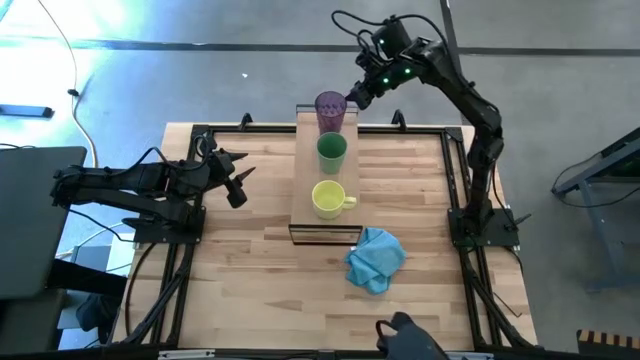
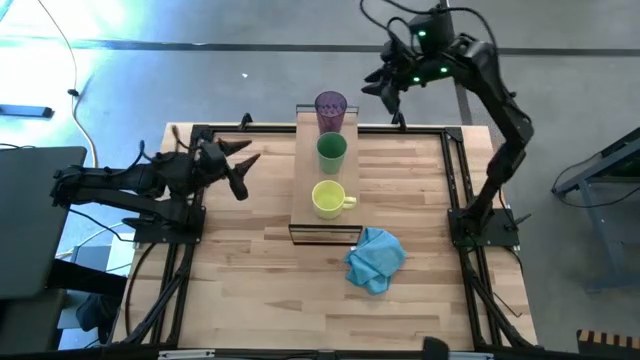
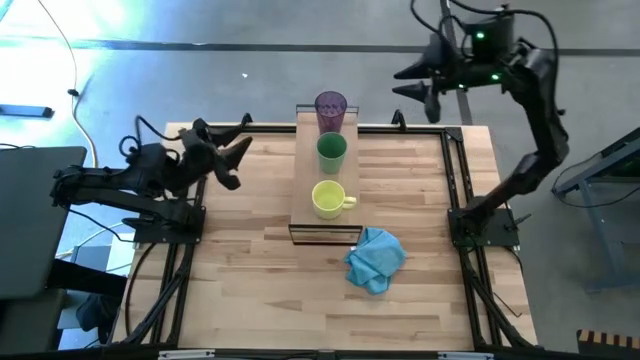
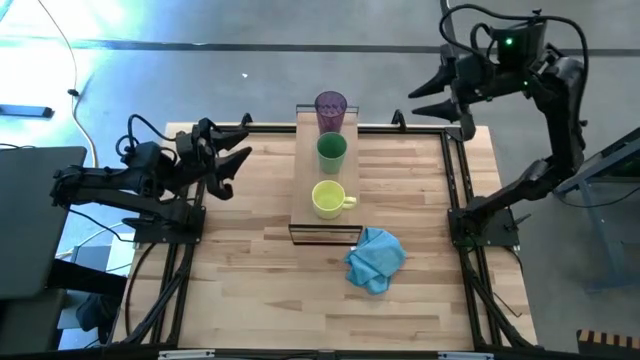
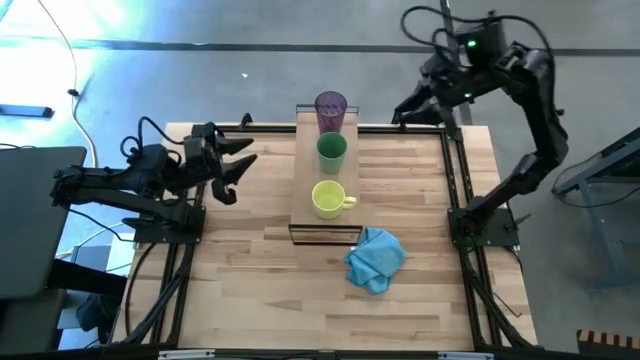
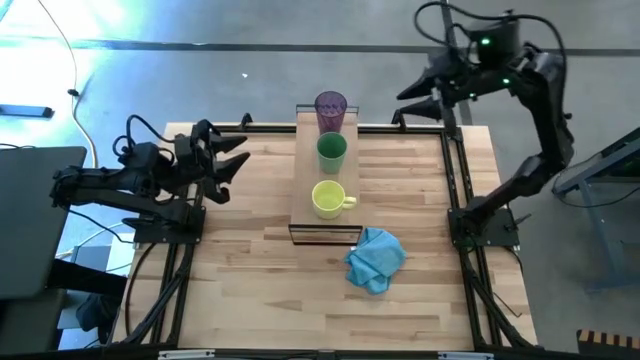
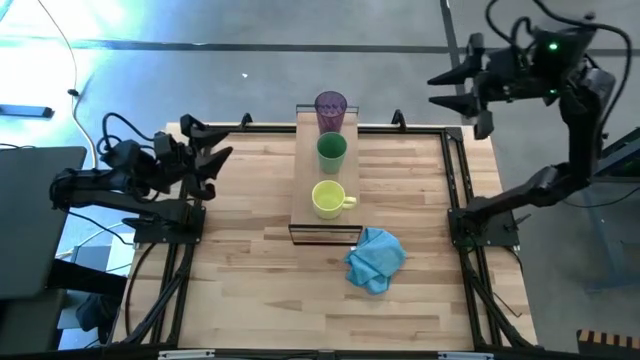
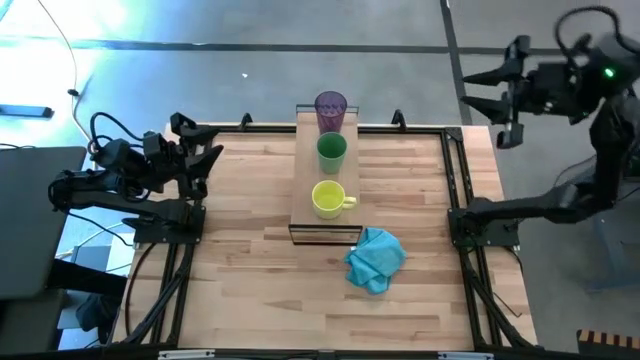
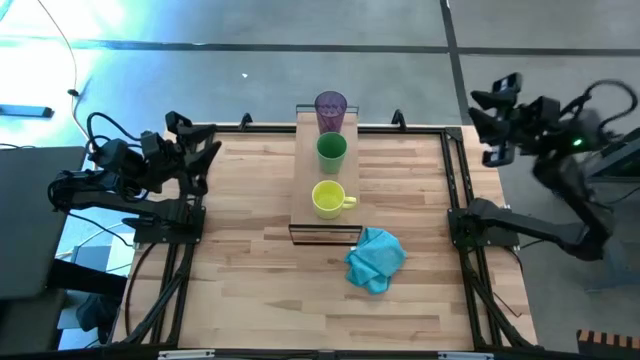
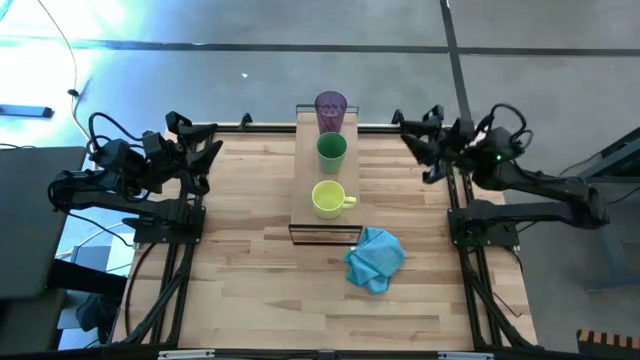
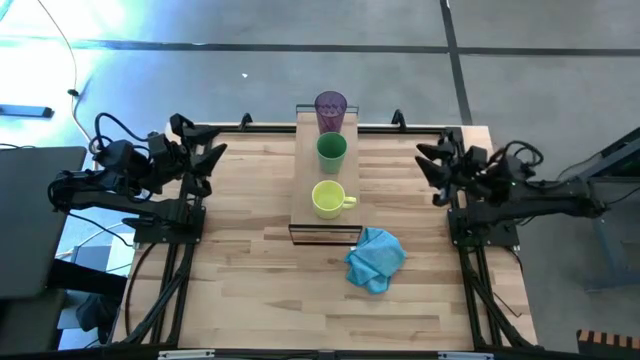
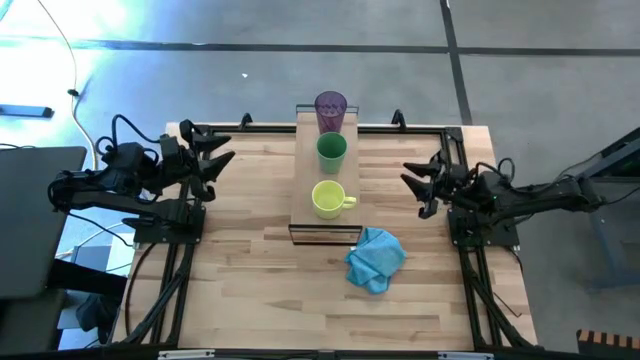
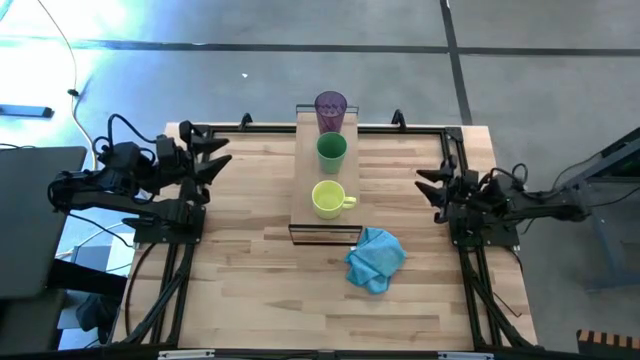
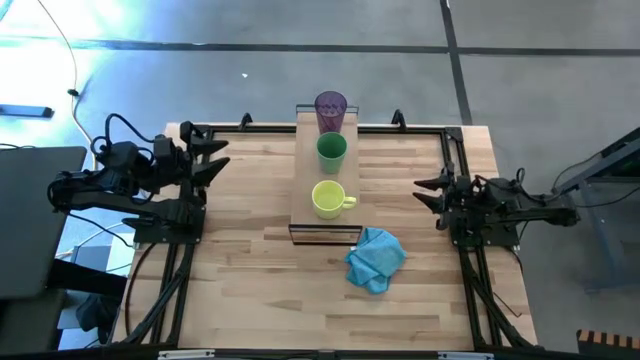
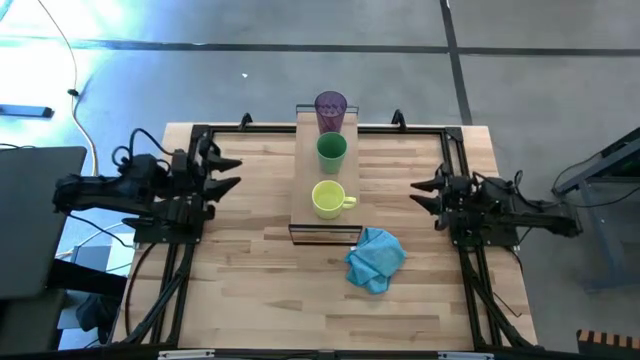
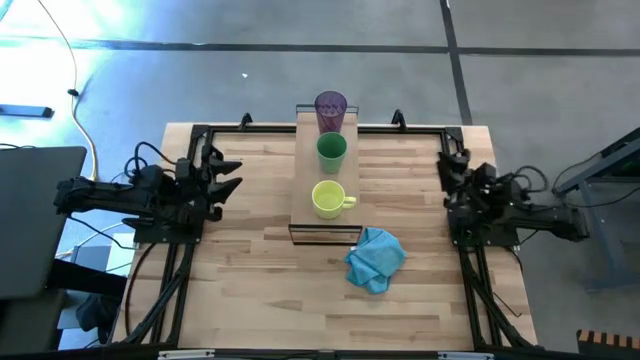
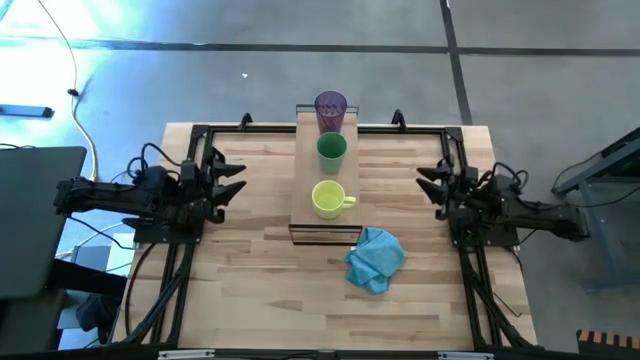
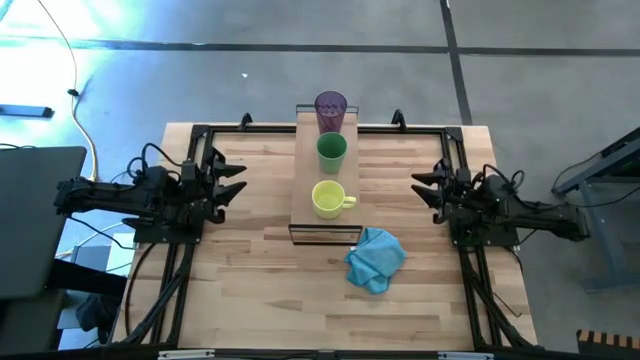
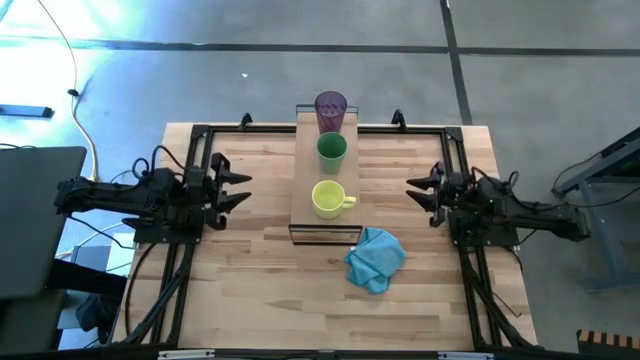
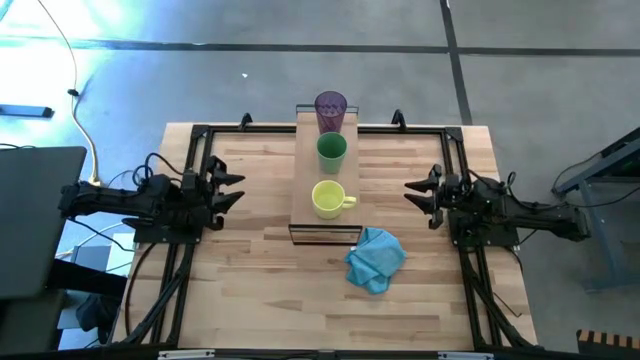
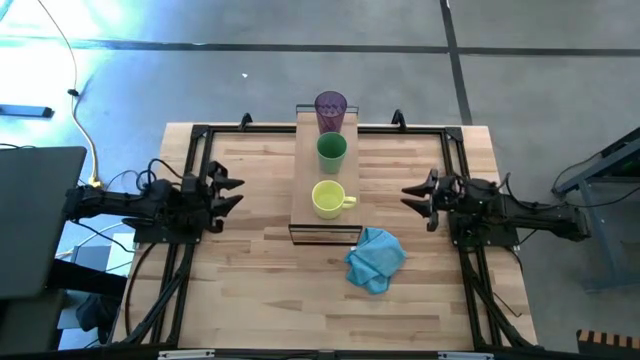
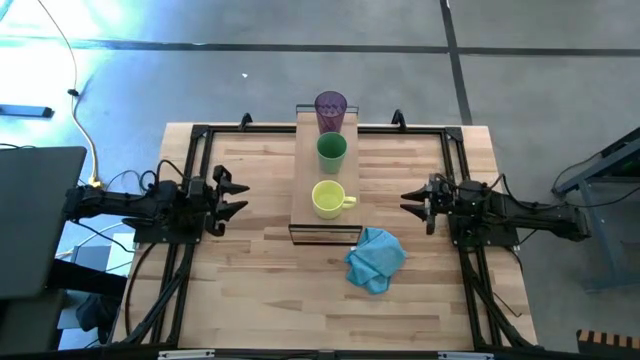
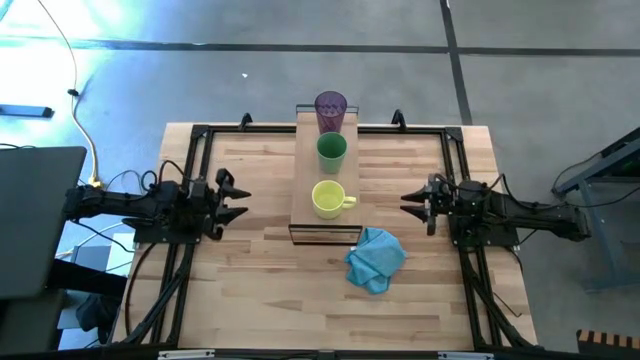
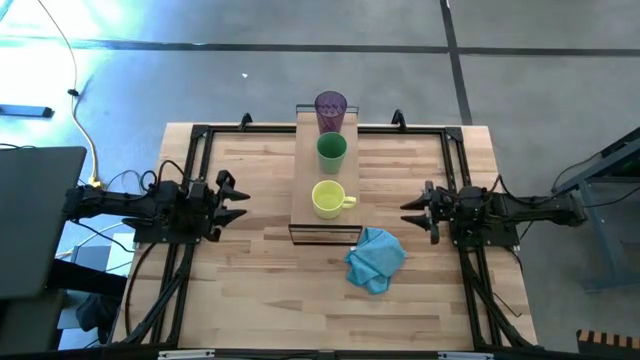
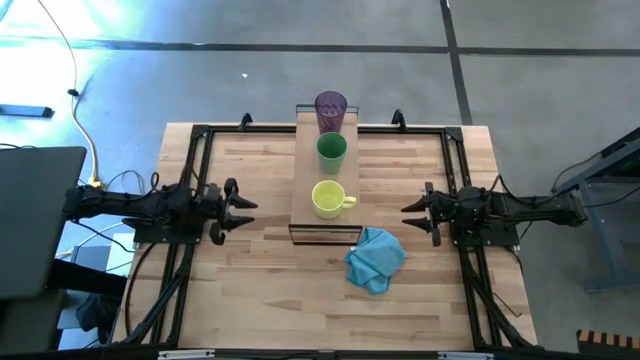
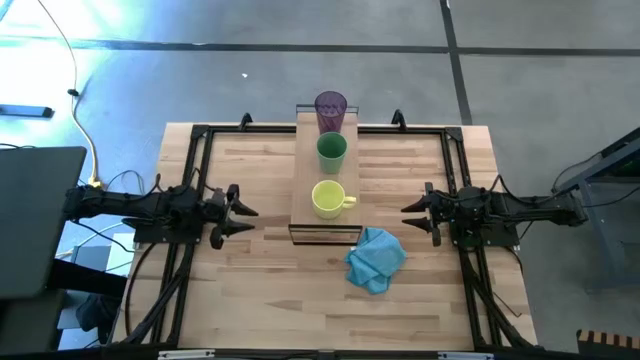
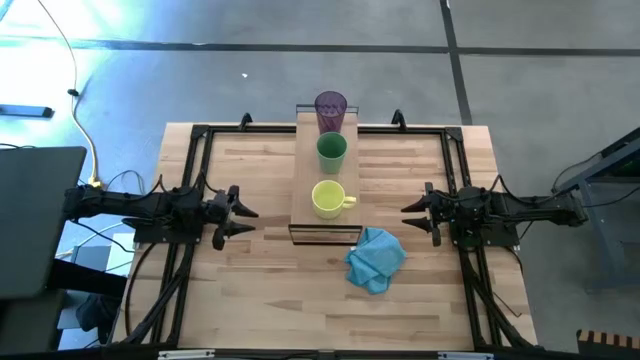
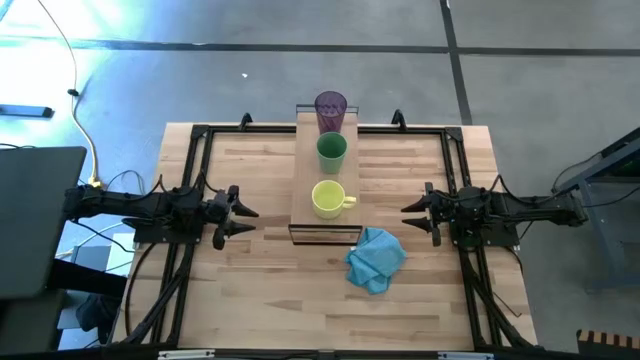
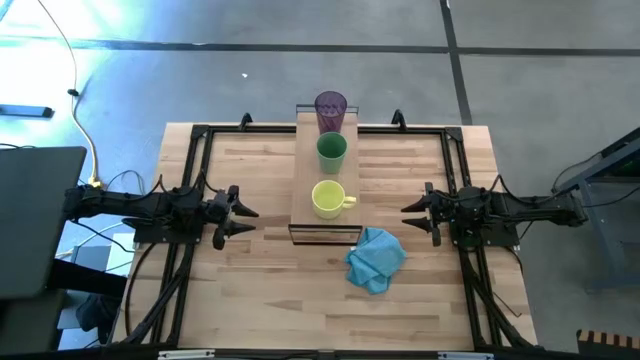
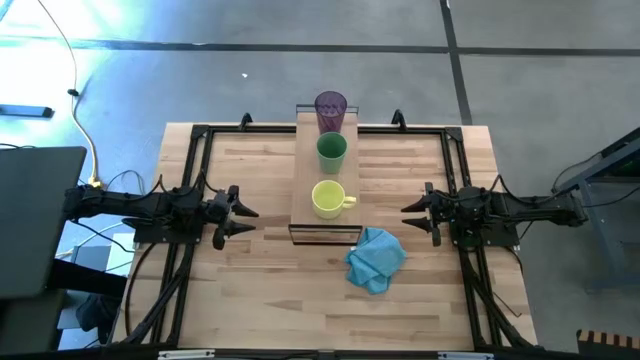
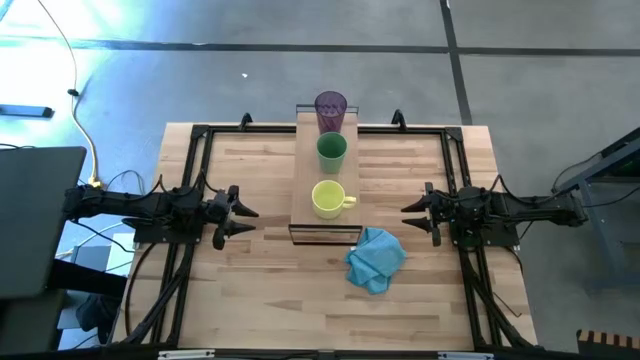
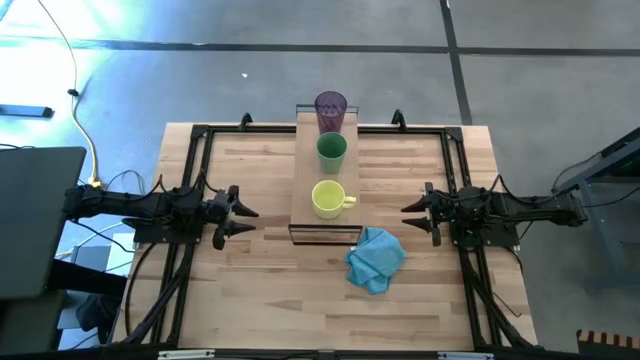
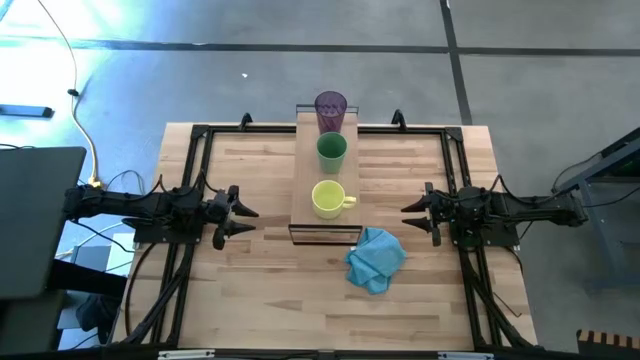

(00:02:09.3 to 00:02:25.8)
Task: Stack small to large cups/mugs on shelf
Return to Home Position

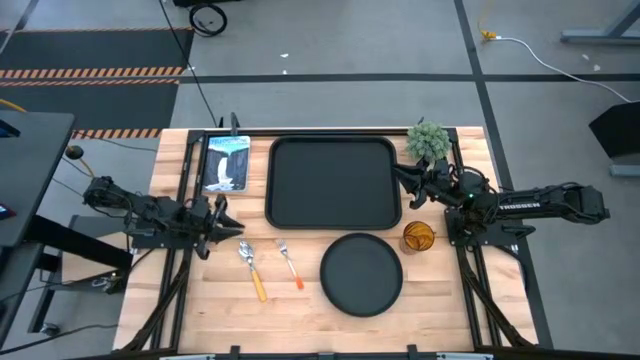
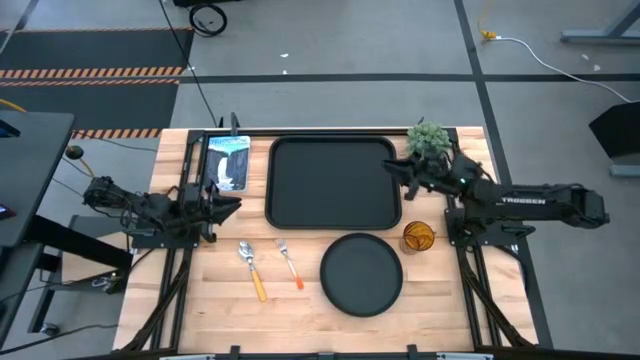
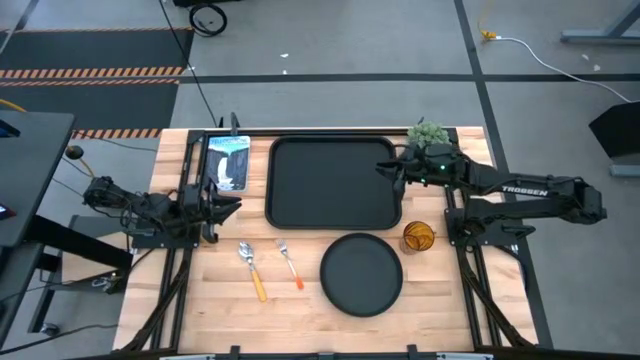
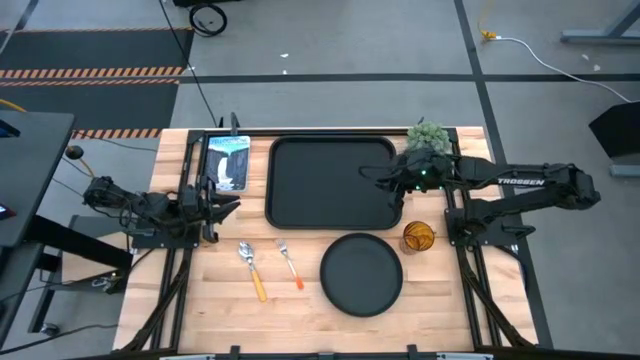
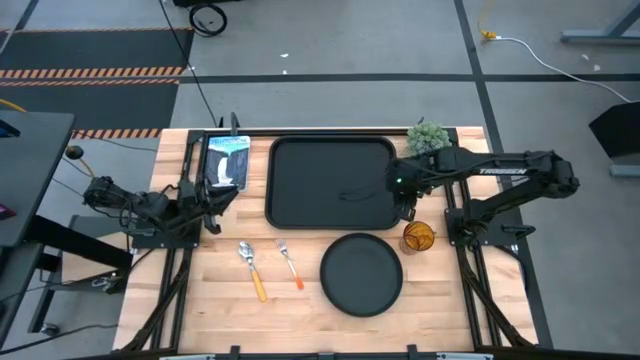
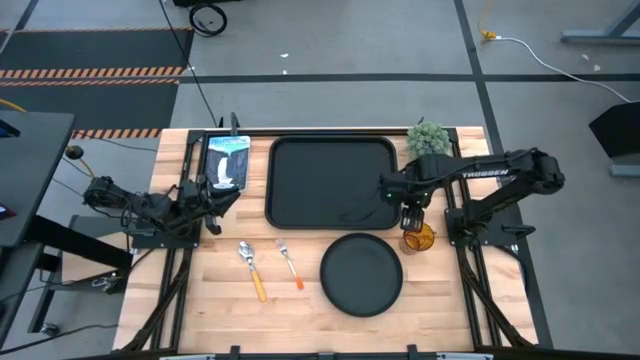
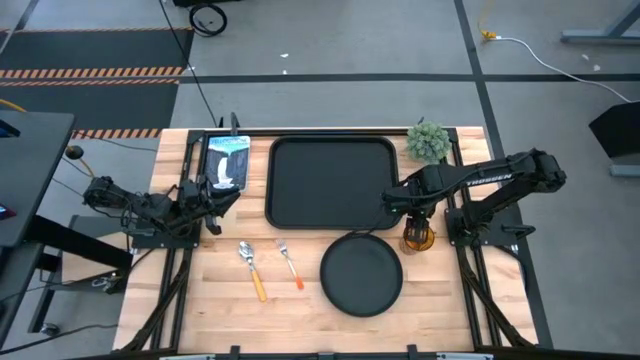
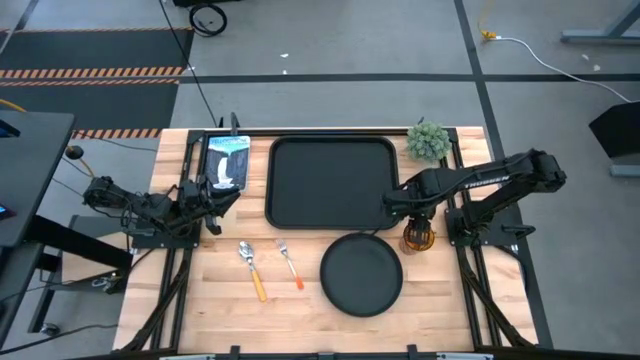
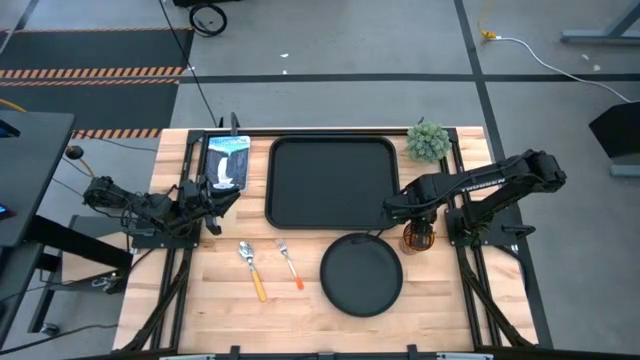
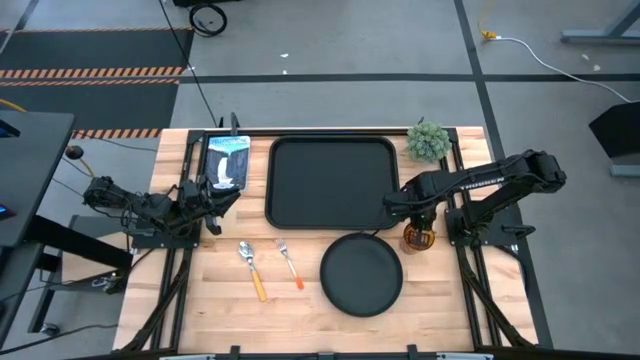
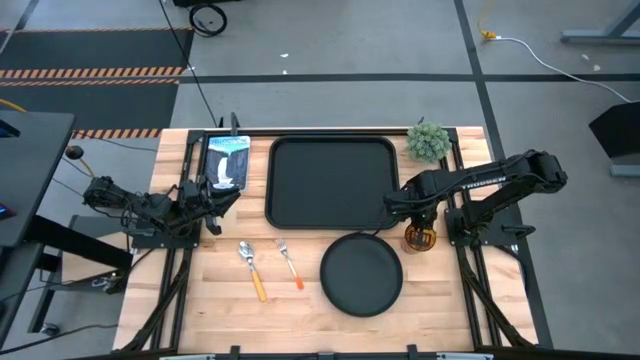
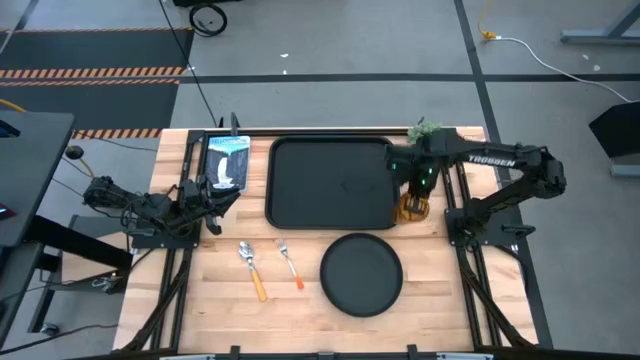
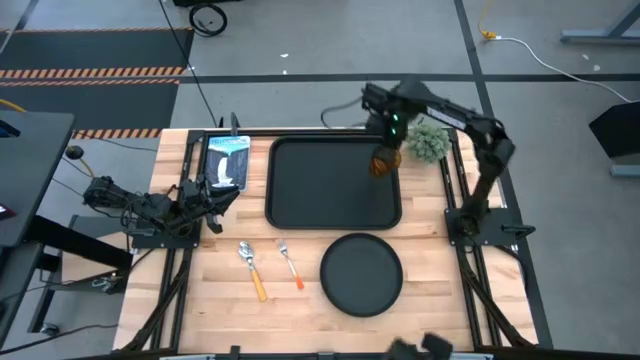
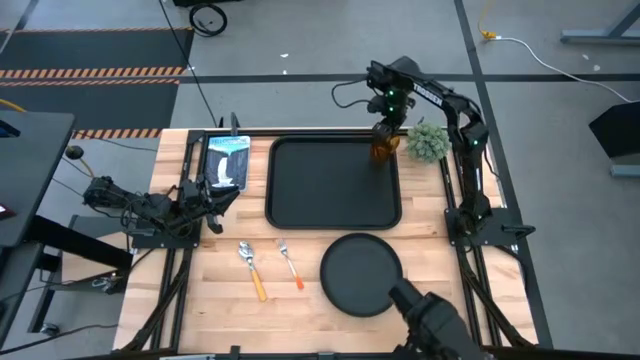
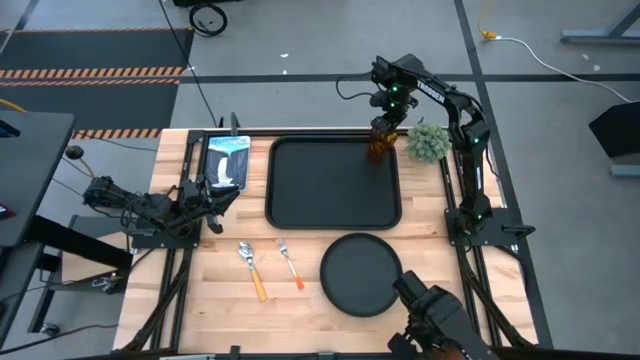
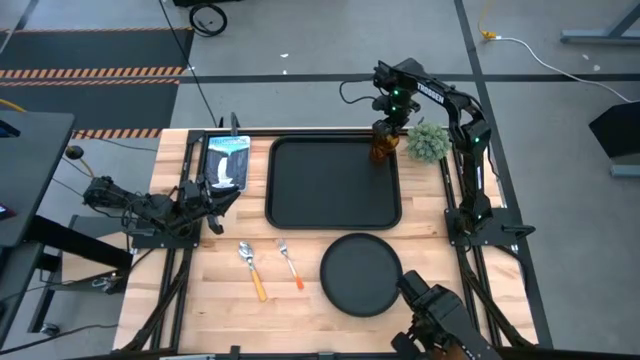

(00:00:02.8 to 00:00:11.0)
Task: Pick and place plate/cup/fork/spoon on tray
Put the brown glass on the black serving tray
